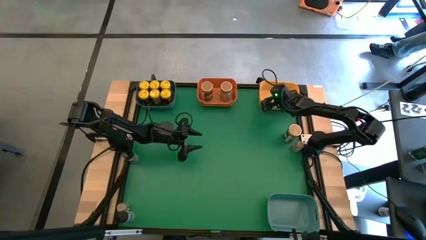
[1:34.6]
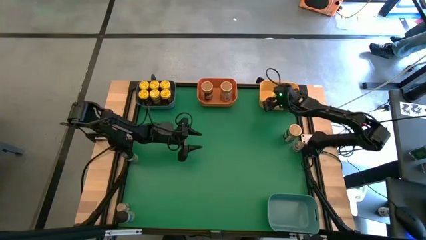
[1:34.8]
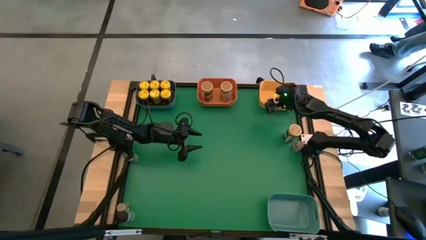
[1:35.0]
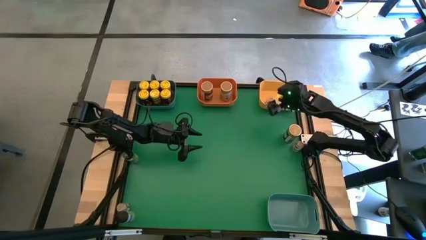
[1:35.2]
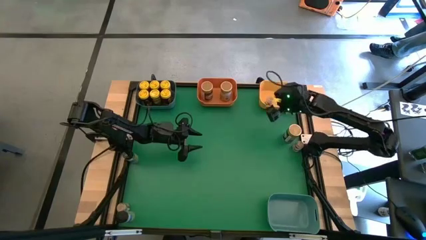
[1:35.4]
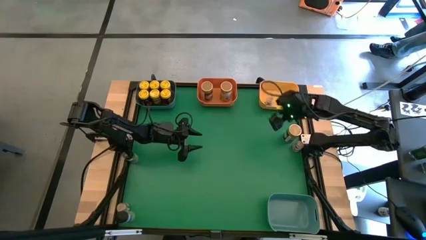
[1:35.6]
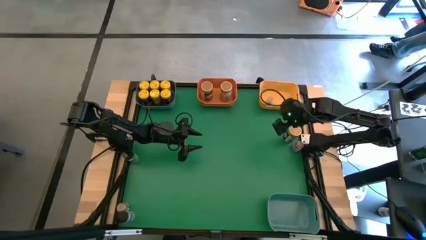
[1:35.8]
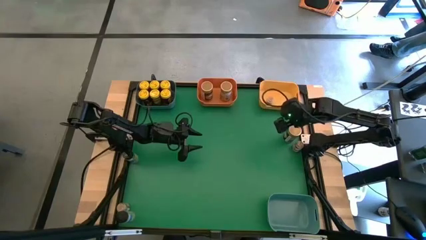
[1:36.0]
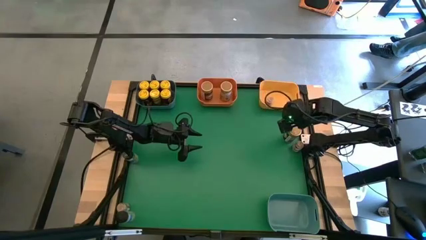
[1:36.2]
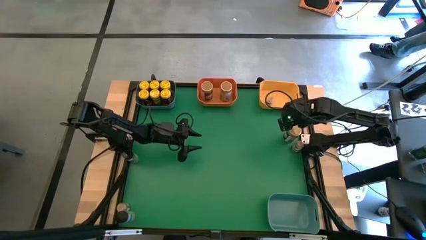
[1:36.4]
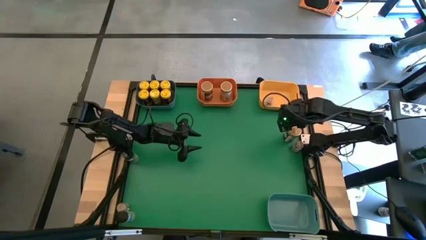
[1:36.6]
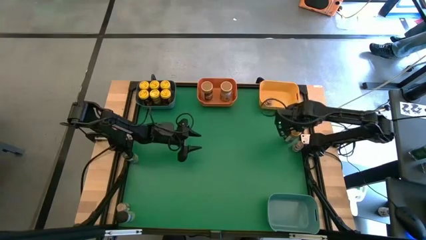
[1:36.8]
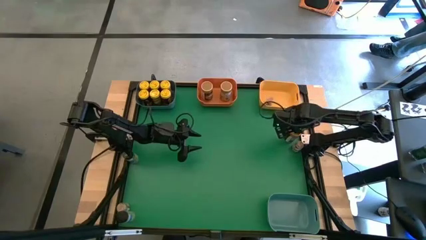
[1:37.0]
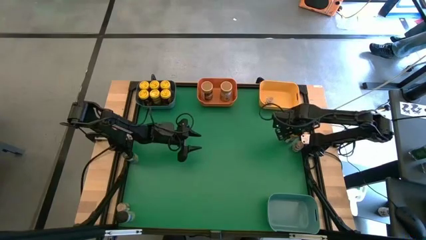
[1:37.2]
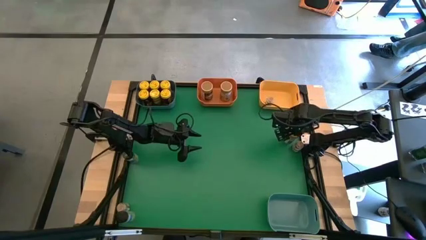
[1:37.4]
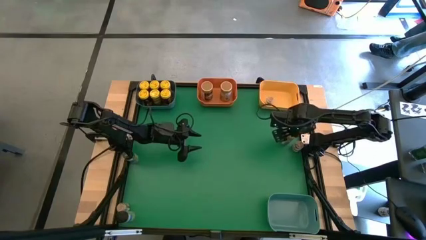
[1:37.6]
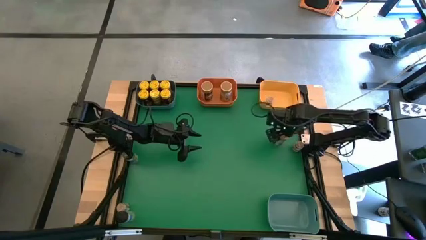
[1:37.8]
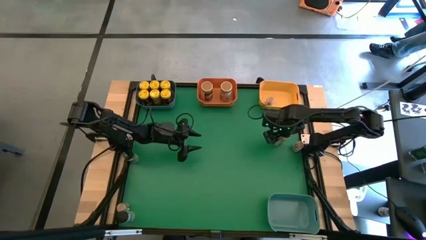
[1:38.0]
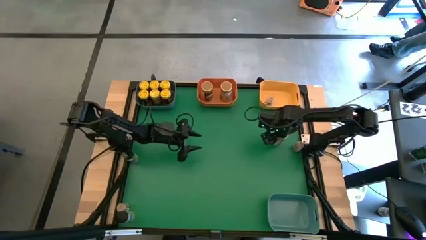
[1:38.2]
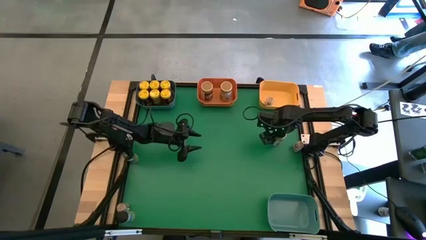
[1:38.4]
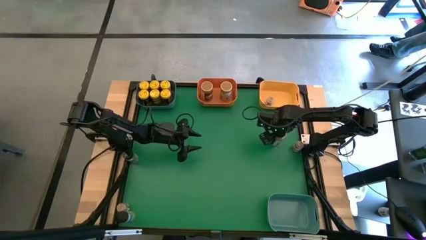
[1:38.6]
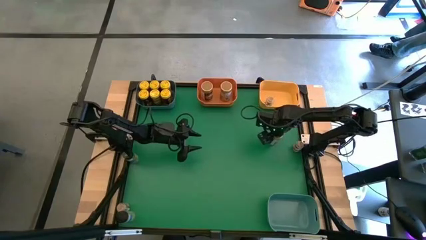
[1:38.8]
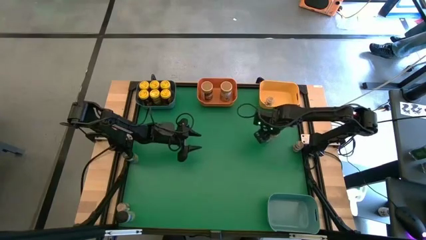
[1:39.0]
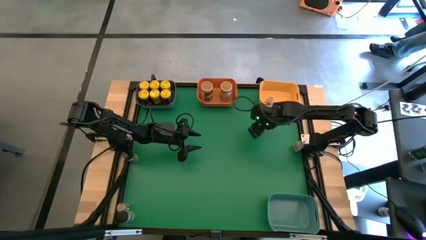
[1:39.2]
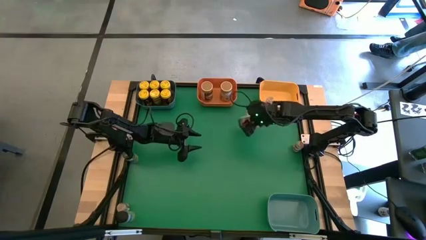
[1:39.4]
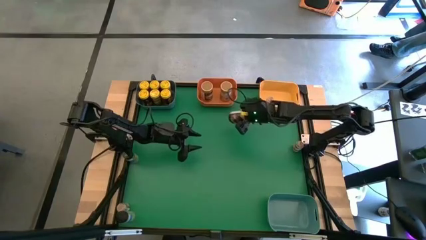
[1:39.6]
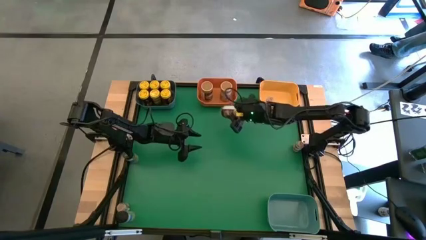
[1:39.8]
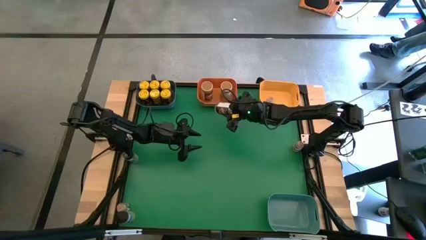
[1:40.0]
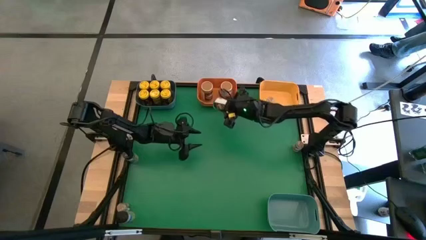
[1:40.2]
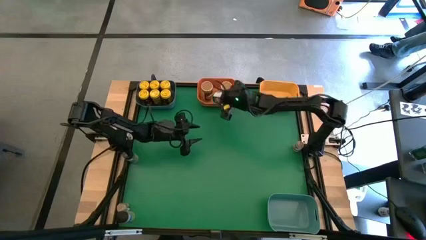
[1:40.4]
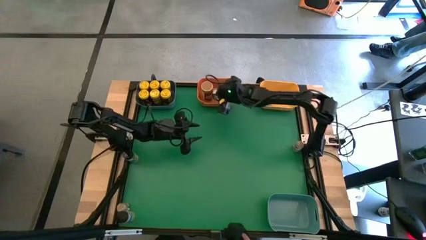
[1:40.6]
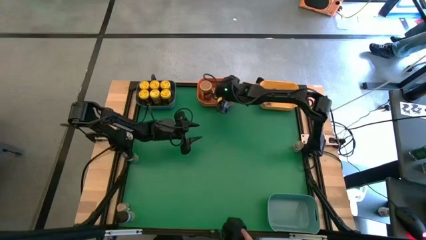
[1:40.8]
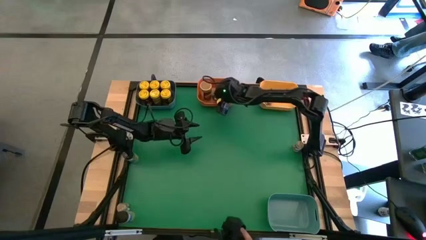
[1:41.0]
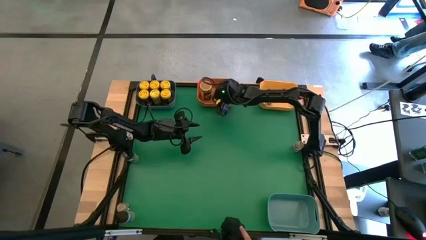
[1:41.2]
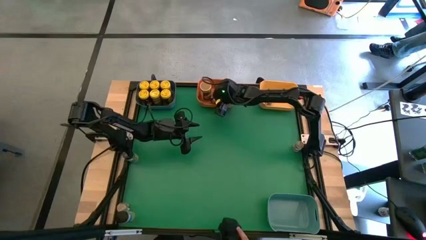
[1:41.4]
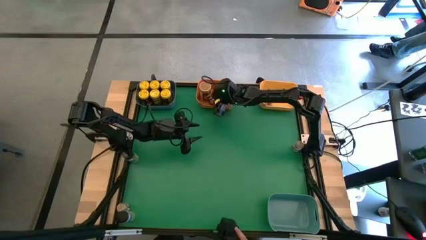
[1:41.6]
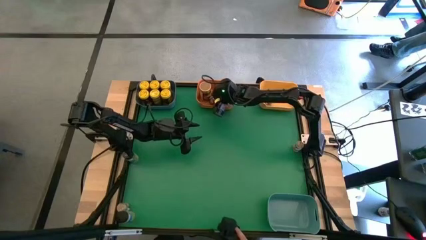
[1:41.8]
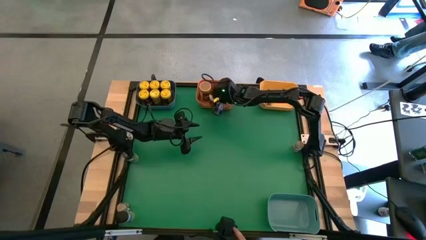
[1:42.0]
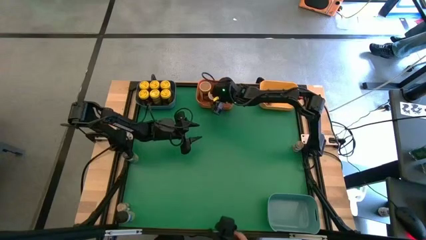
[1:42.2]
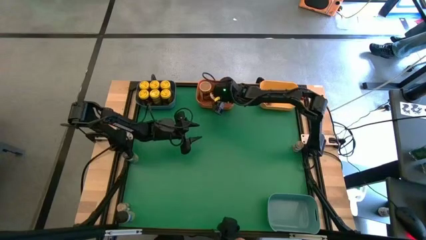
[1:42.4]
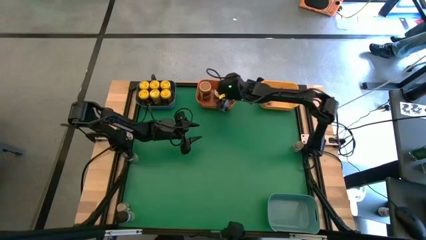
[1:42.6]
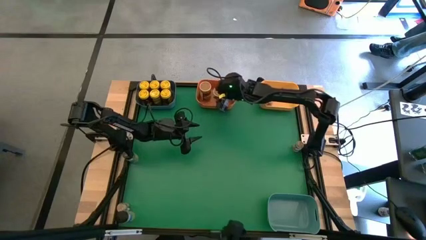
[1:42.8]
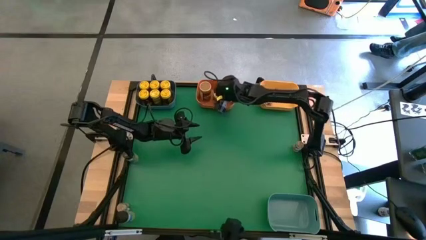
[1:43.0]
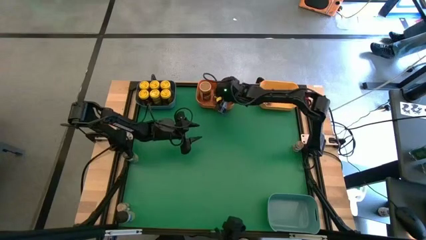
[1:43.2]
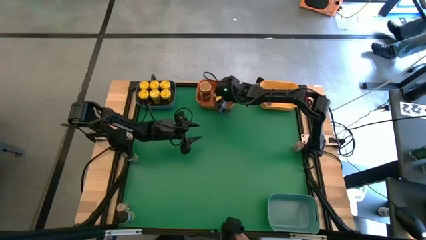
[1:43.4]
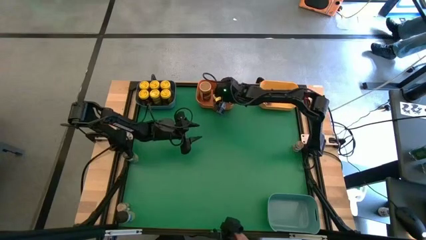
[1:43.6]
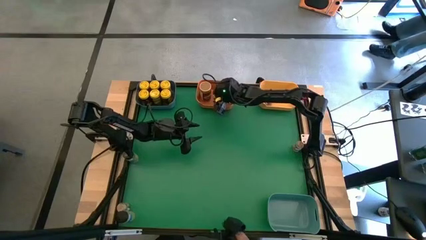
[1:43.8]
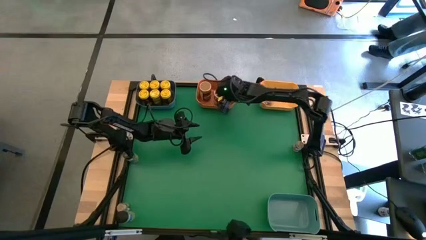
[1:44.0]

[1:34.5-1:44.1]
Task: Sort spices by type
Put the gold seasoning bottle into the orange bin

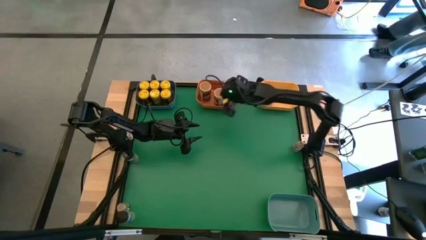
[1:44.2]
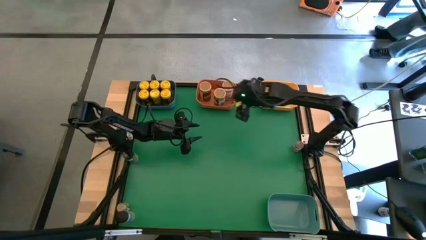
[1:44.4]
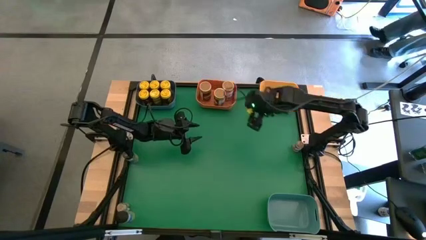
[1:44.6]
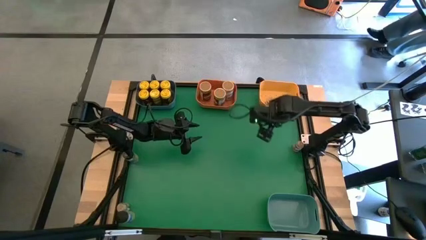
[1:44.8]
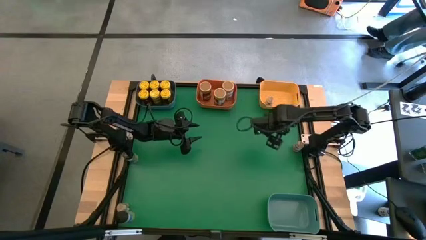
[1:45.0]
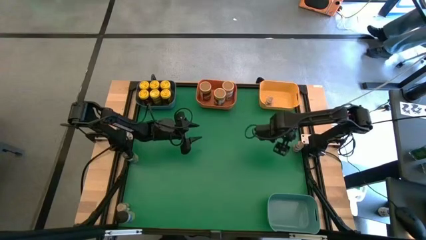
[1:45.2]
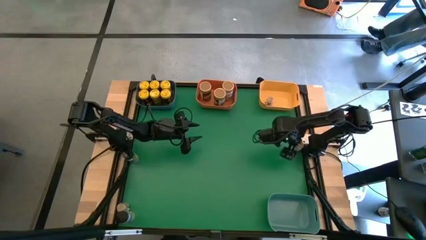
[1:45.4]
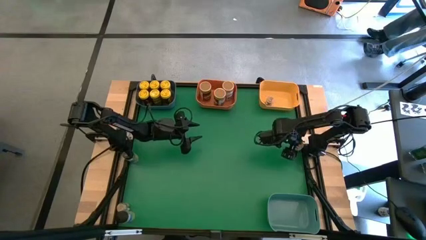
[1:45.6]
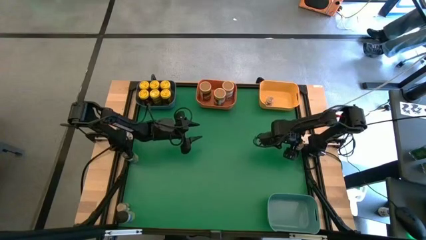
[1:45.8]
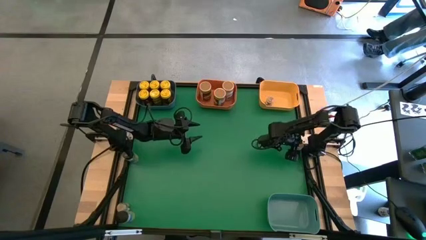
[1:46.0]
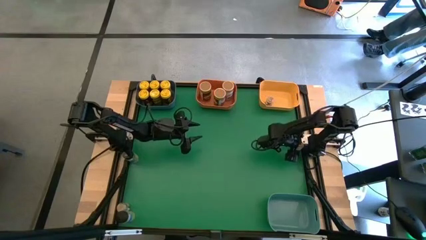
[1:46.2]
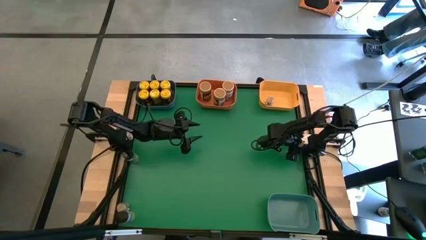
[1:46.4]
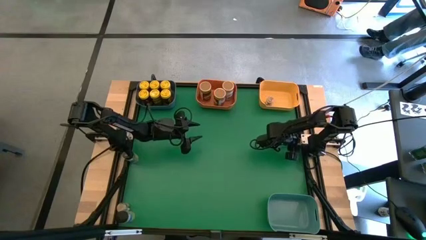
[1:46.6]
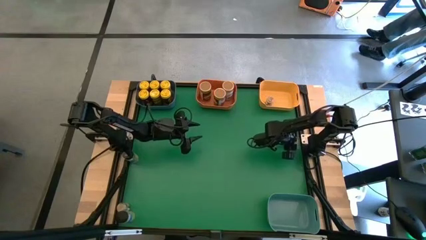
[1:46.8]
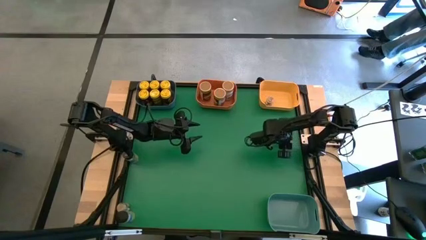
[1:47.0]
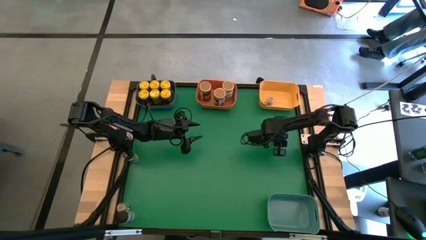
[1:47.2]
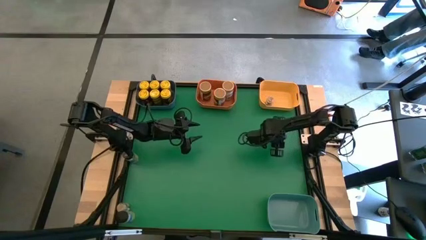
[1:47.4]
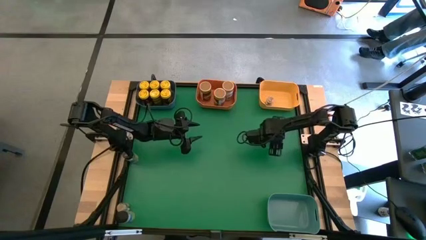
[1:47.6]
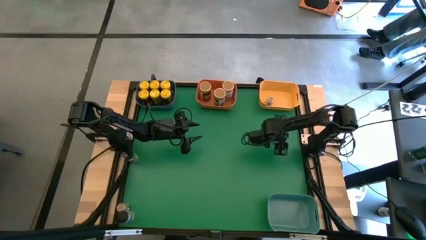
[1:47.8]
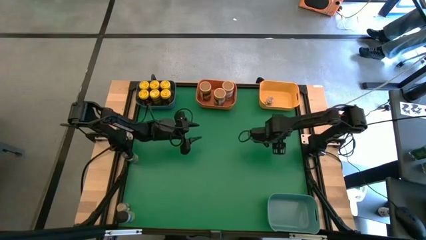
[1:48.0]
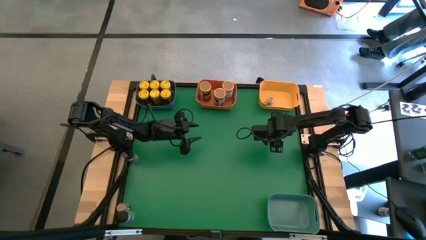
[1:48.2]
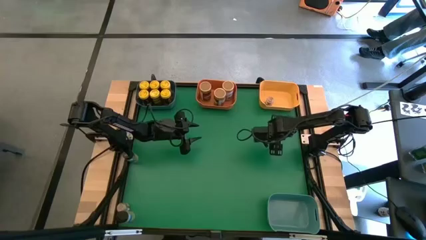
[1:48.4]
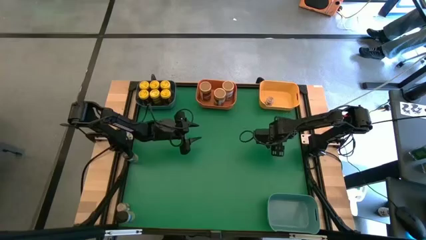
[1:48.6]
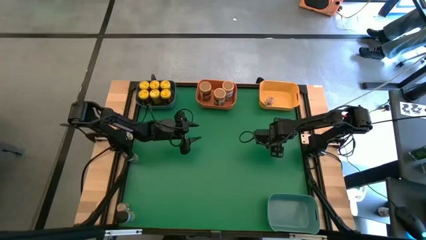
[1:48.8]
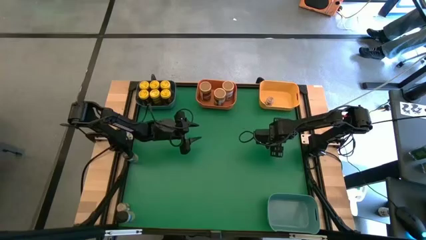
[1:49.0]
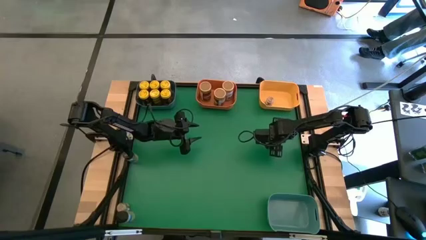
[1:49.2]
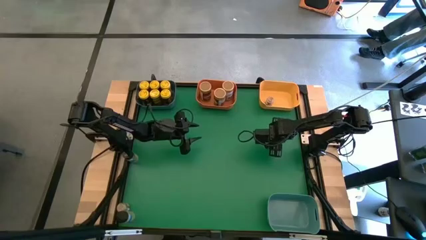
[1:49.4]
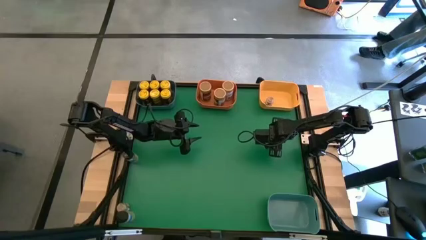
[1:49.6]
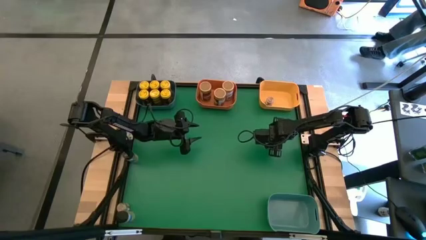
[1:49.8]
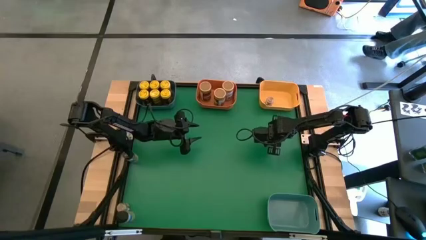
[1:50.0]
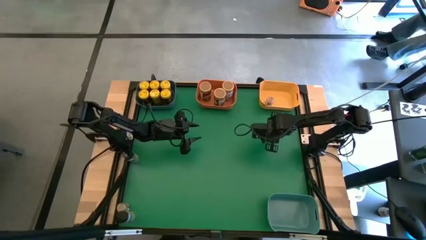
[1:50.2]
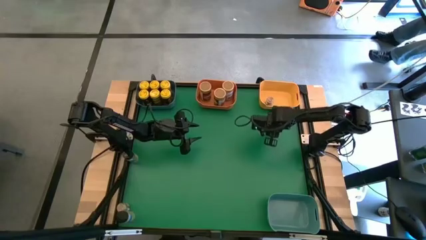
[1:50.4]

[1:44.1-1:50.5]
Put the brown seasoning bottle into the yellow bin
